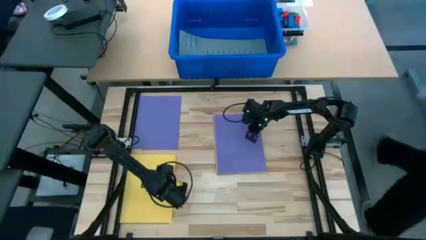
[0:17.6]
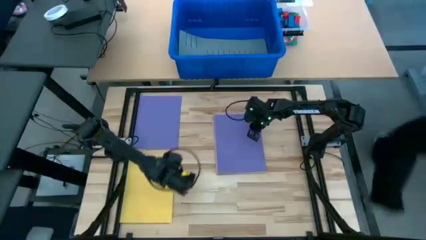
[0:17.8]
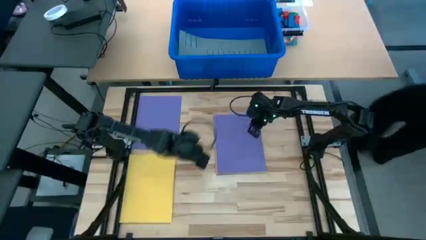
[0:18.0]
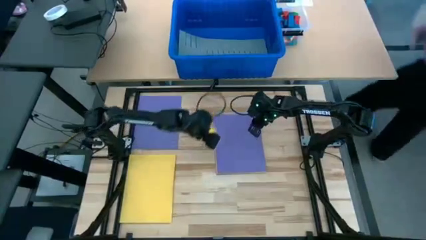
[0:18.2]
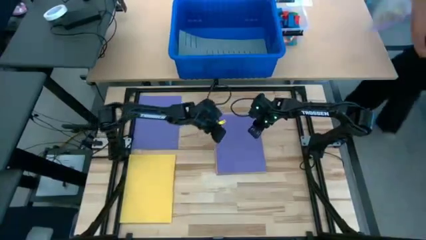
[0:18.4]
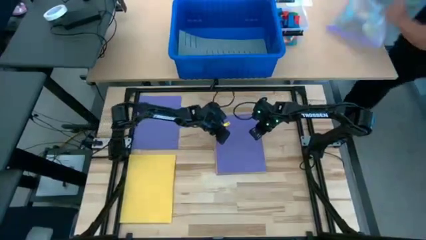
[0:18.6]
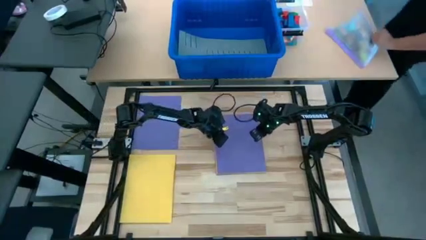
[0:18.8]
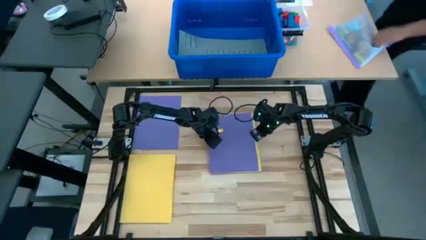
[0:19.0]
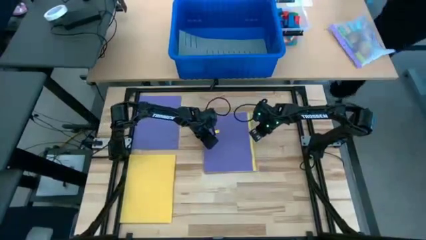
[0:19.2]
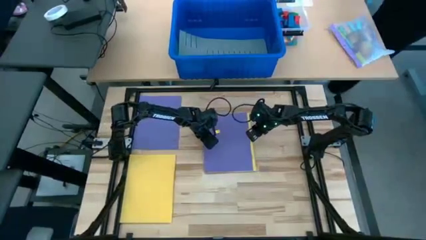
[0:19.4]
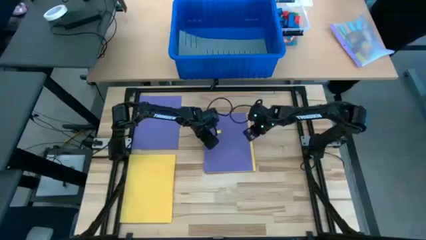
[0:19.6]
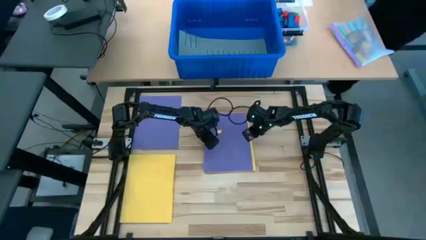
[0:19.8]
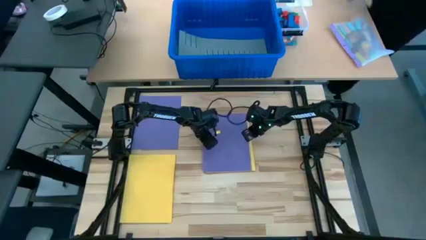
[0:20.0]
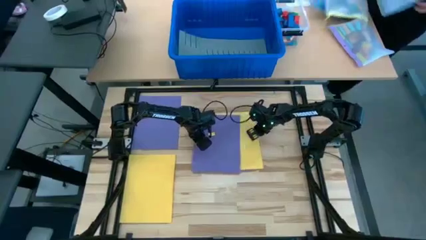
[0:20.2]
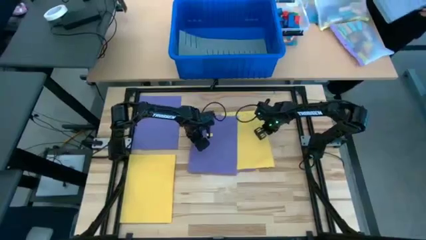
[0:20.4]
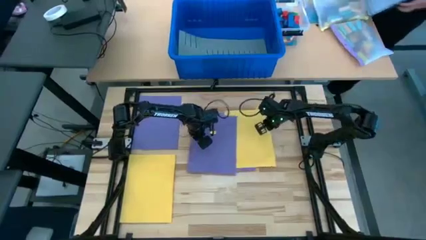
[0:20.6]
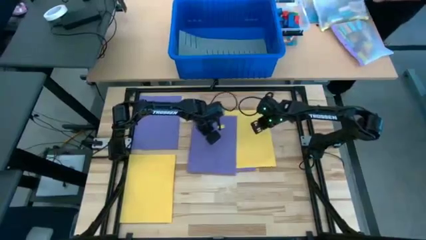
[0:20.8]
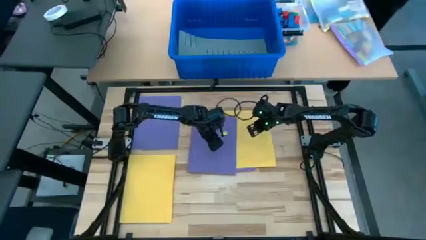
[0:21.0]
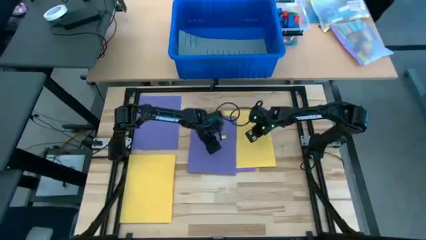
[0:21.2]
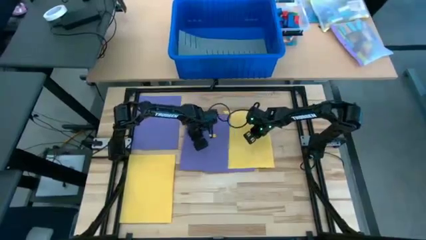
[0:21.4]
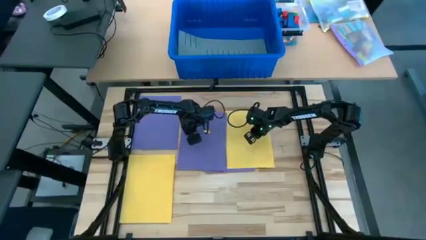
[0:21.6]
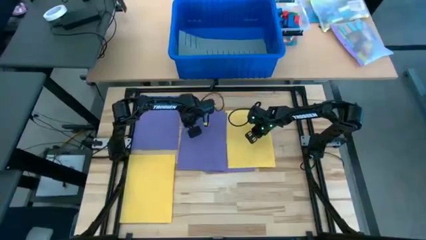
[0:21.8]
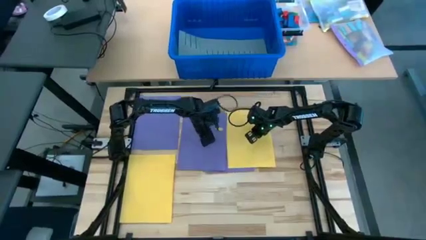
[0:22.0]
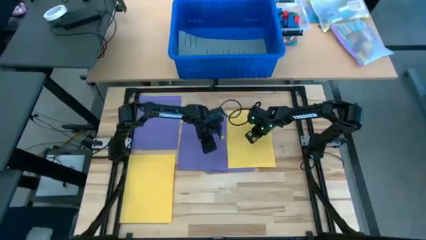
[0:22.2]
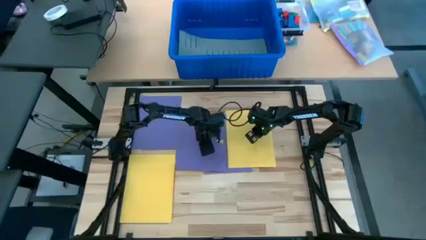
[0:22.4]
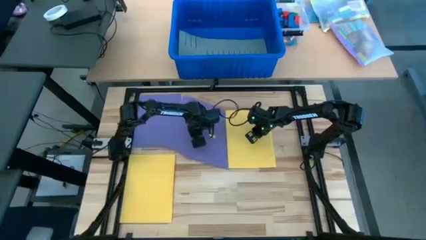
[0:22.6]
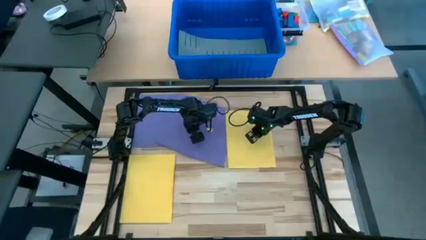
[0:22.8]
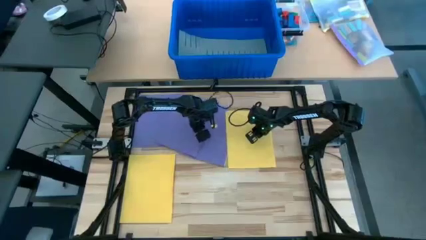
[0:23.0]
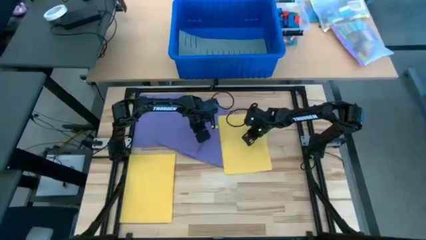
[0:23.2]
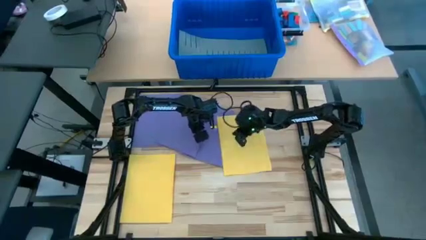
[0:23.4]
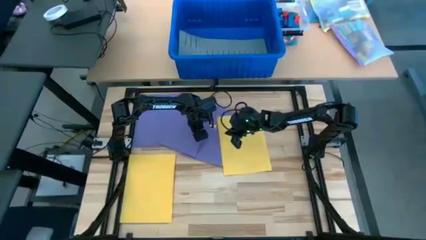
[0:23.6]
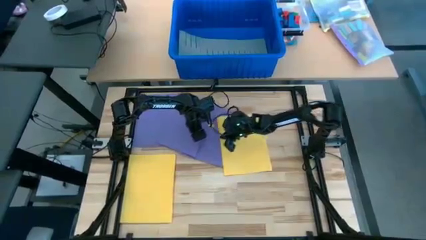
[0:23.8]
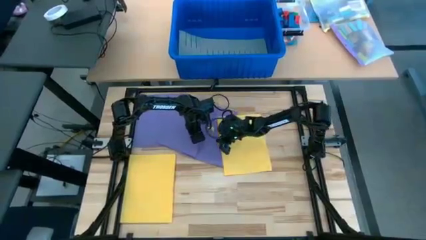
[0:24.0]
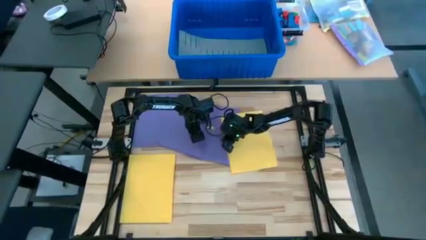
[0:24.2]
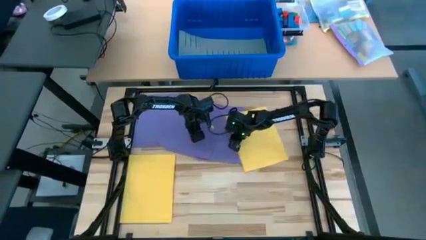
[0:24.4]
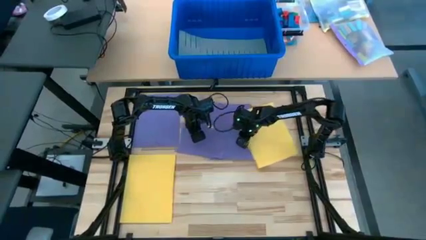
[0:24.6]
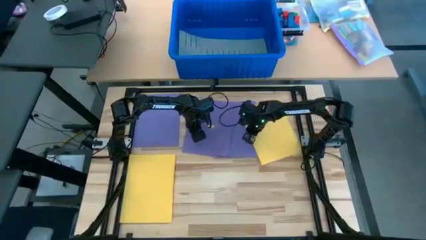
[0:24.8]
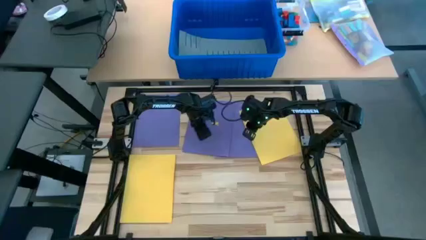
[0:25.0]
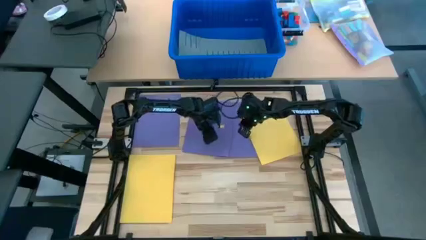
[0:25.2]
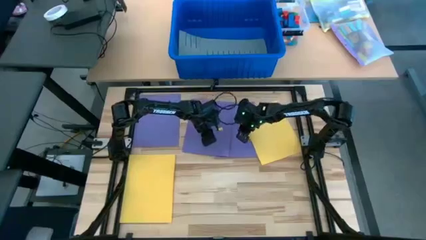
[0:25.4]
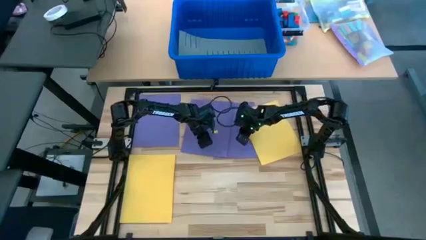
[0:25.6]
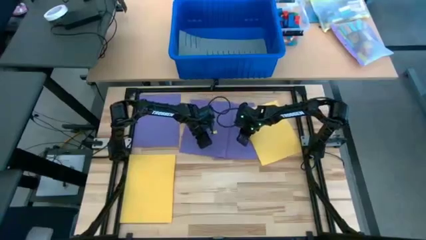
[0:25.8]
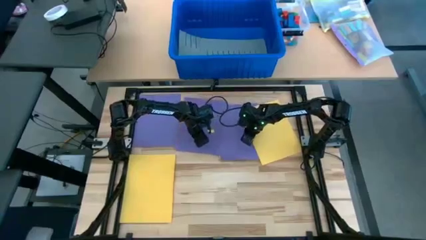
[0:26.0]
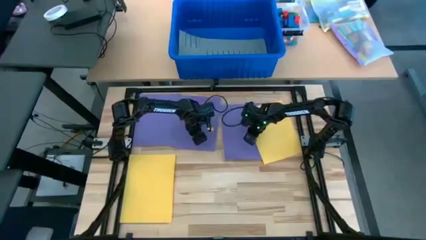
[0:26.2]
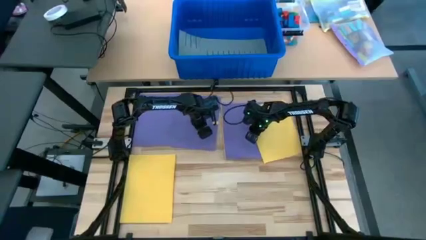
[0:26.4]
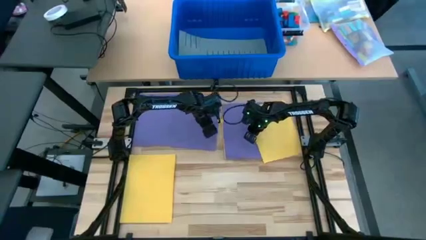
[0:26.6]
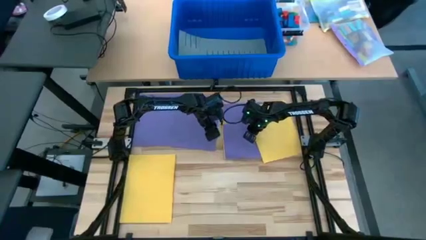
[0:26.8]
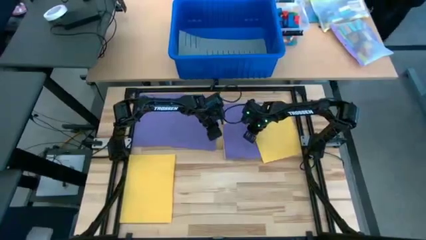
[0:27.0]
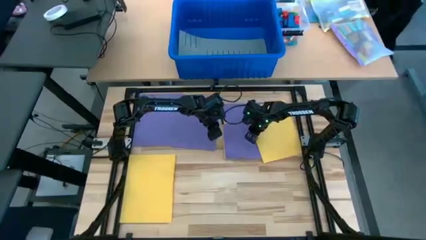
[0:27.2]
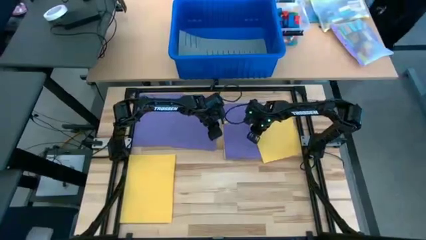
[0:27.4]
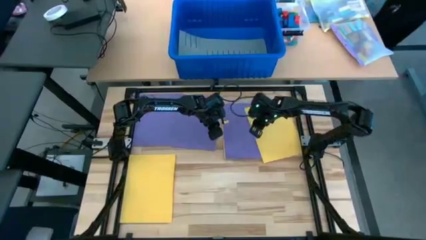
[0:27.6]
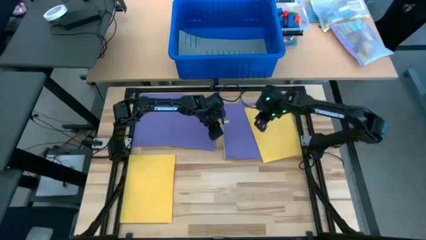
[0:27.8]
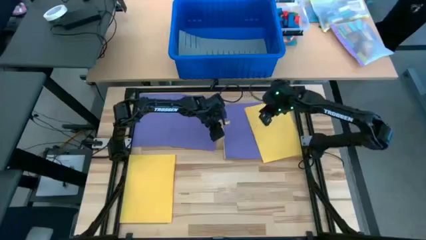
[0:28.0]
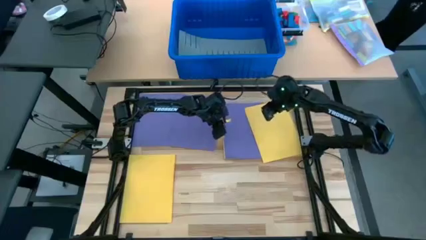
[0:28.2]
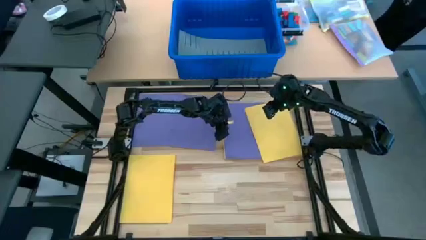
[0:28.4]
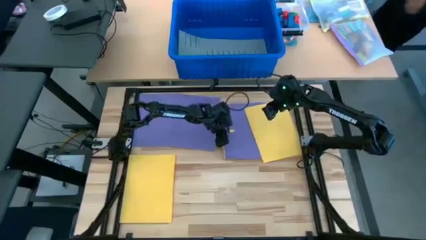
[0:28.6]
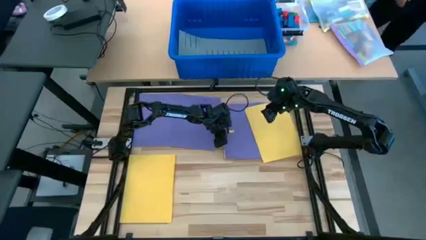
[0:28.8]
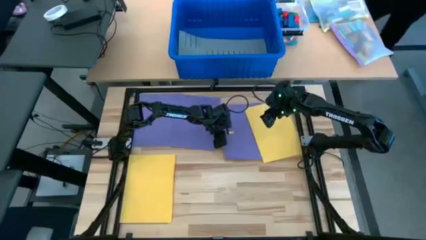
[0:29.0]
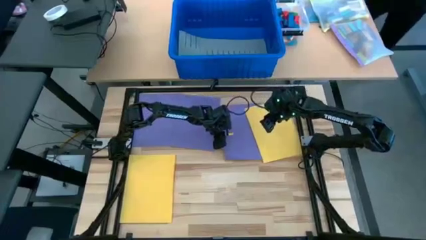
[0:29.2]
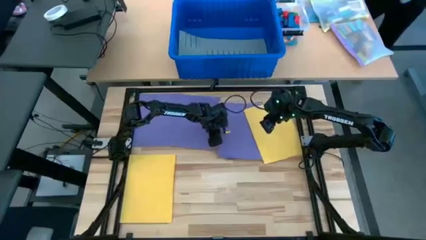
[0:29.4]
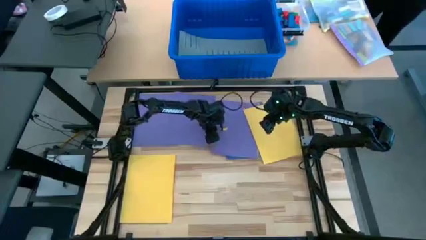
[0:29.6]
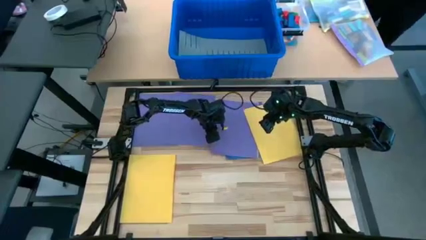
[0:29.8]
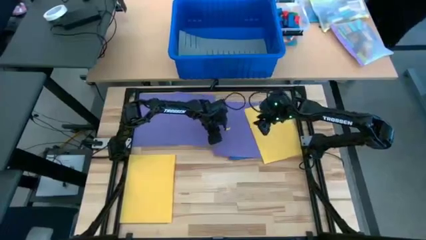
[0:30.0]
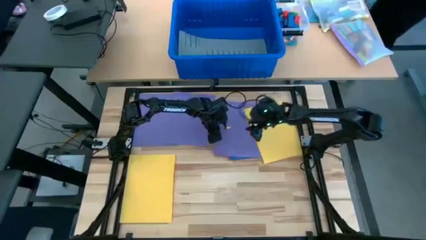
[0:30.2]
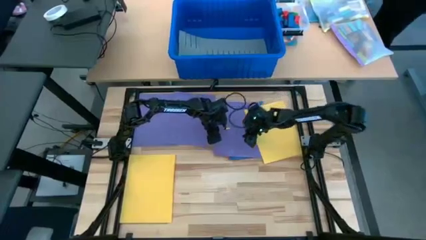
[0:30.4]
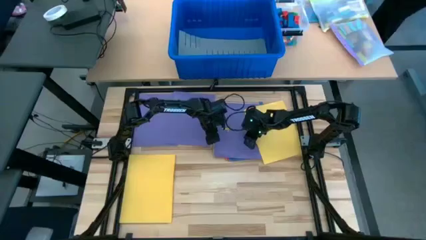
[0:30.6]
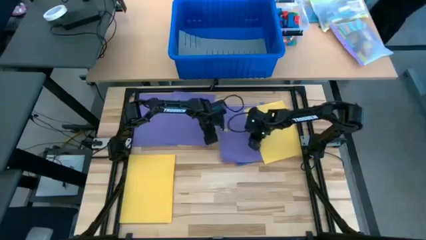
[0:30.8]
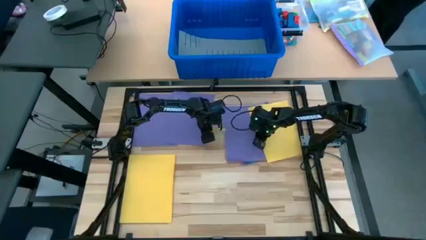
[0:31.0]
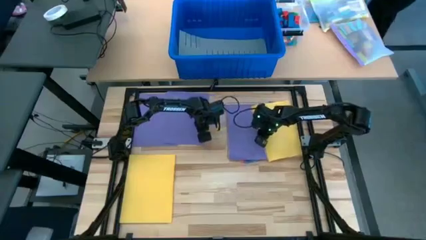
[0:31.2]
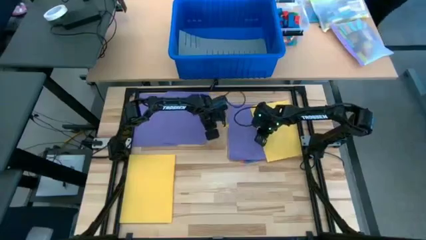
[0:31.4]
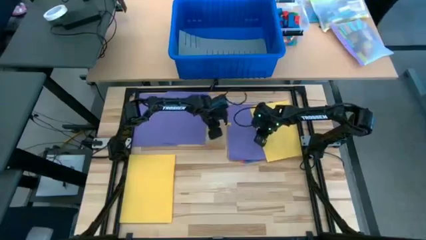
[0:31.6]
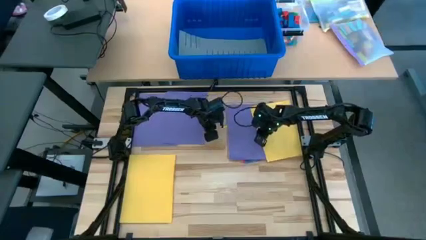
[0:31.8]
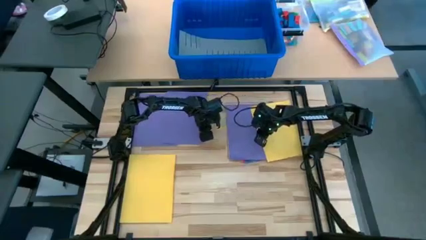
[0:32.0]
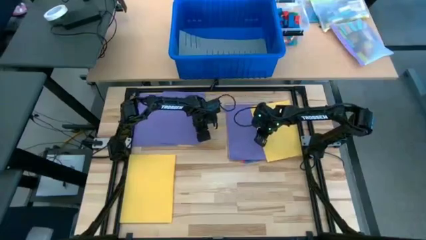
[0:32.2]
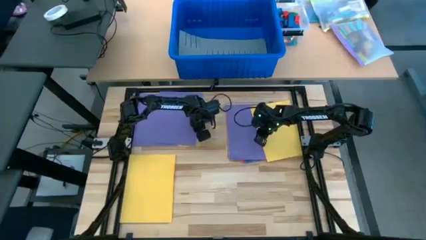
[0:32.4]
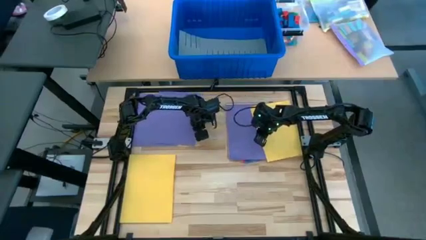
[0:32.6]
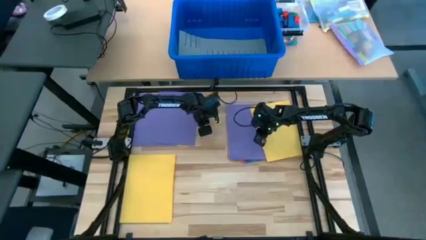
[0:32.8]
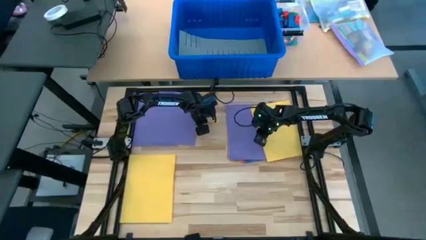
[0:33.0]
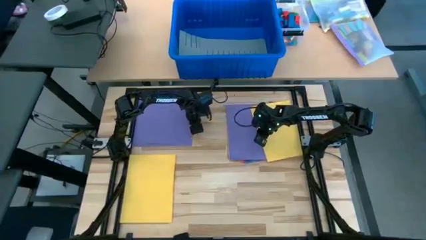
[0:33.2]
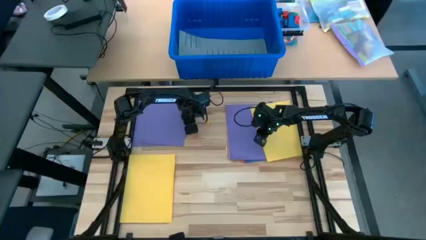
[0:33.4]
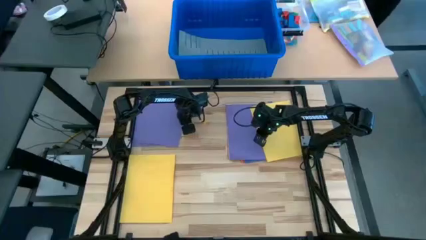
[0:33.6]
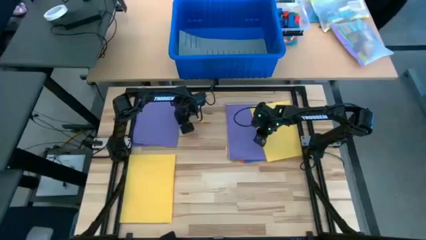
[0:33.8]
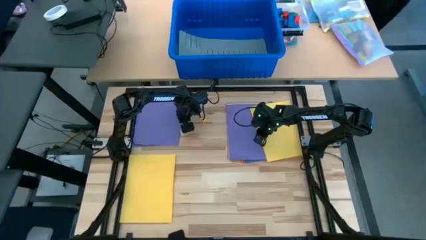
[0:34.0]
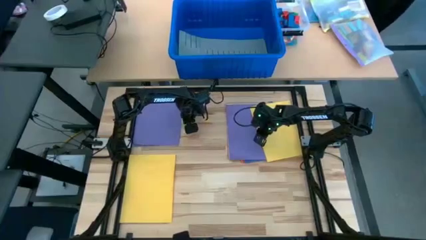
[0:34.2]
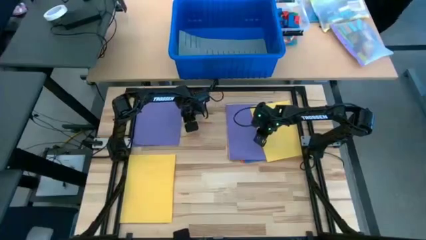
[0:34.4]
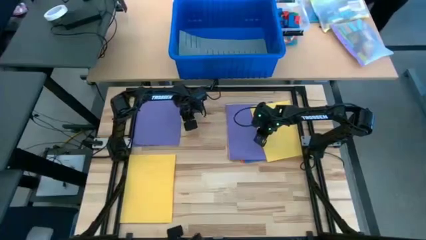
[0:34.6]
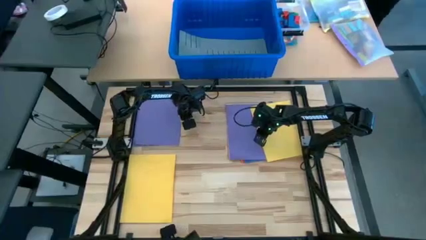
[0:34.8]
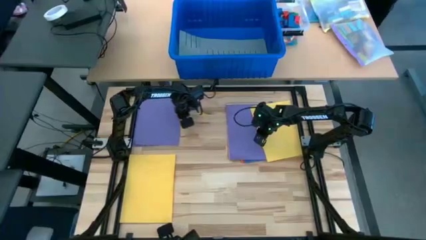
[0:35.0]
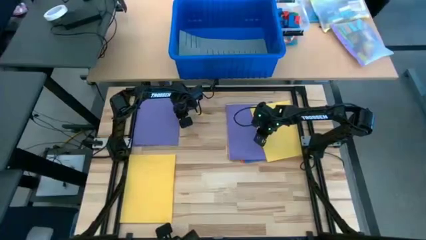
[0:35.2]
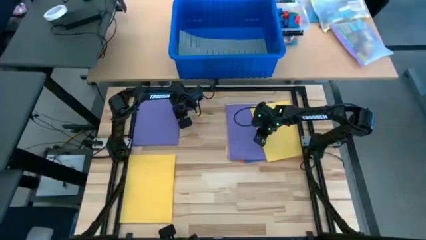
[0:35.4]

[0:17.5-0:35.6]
Task: Organize paper
Stack the purple colored paper on top of the other purple colored paper
